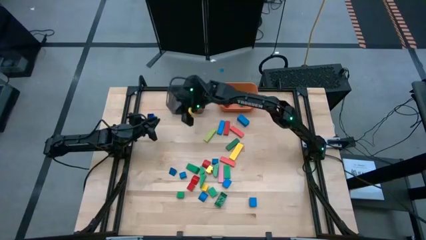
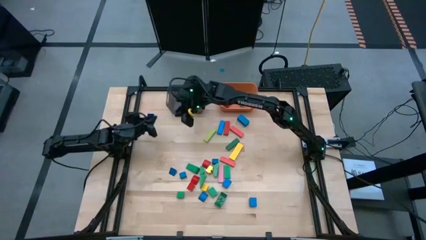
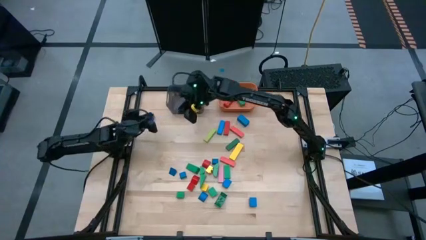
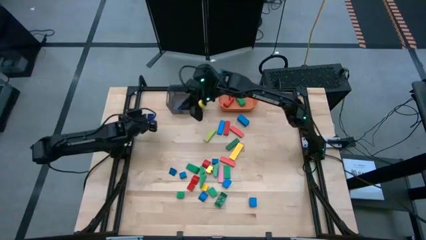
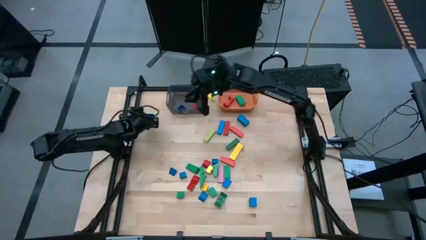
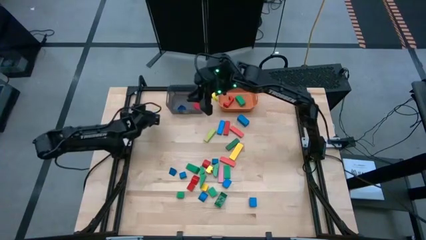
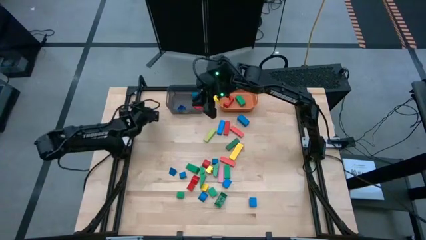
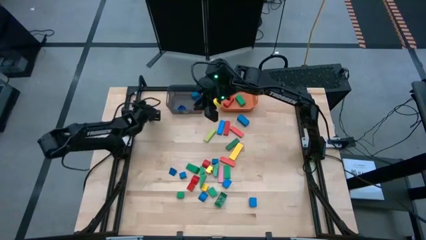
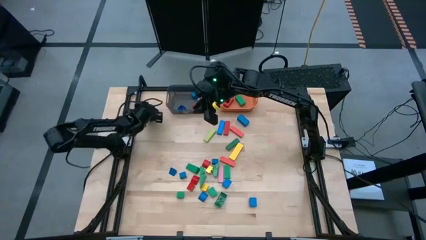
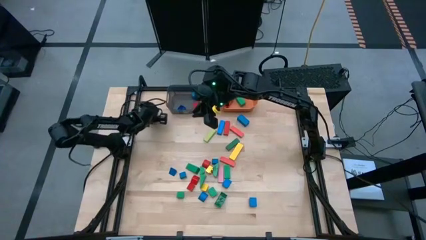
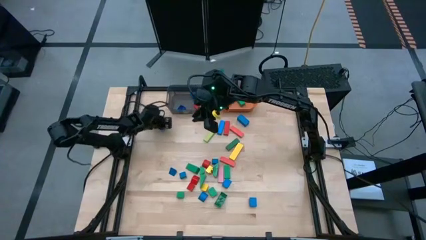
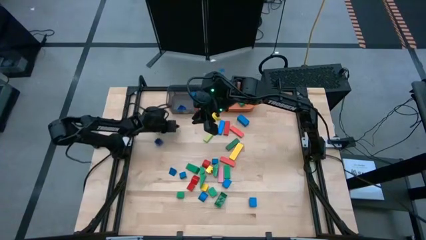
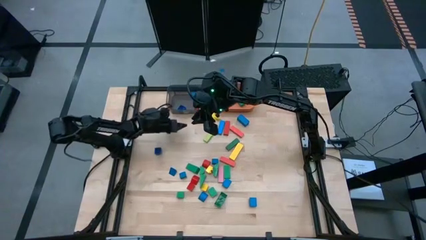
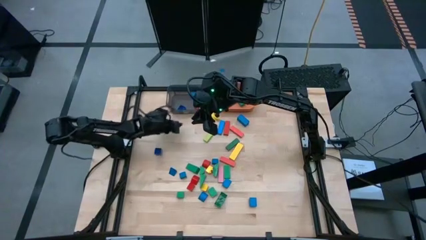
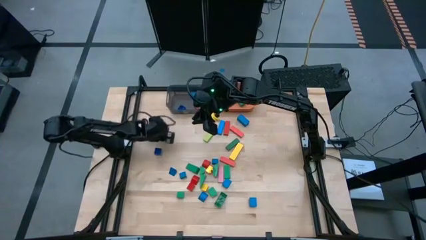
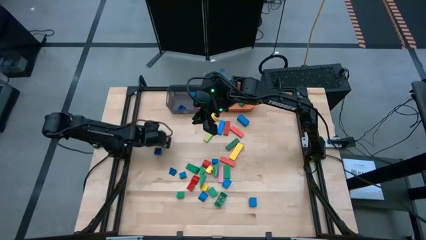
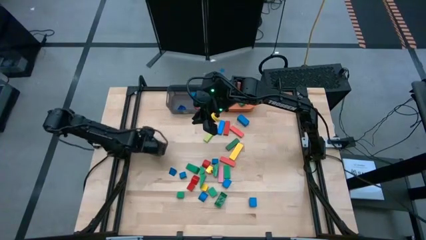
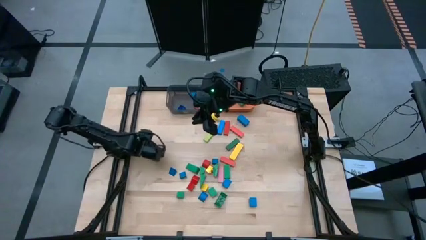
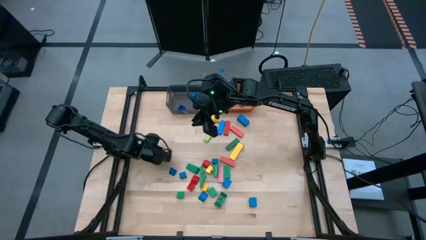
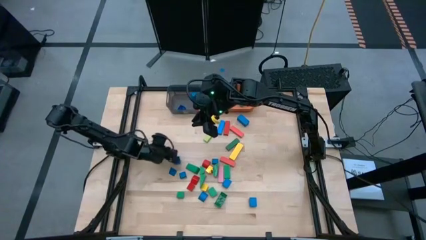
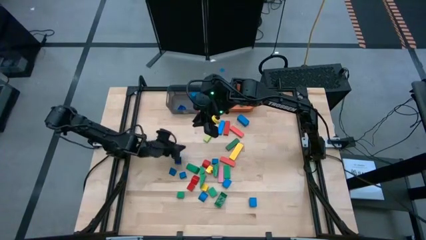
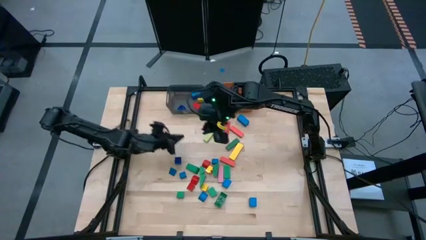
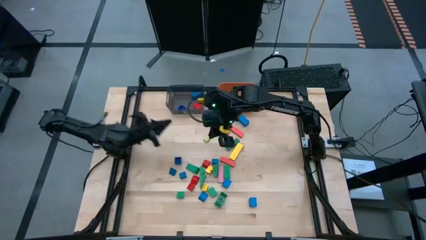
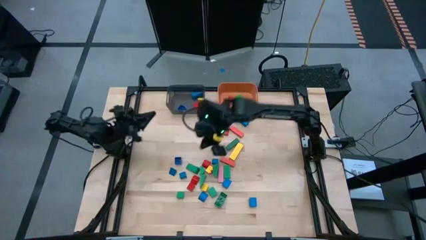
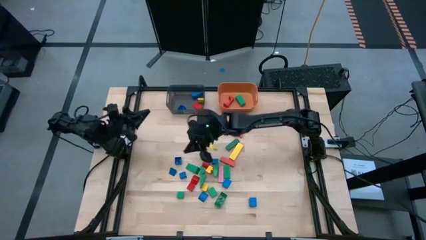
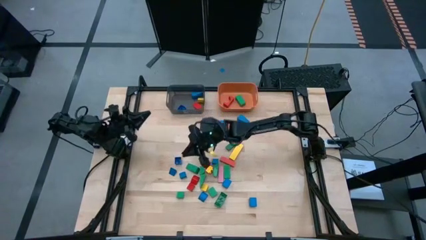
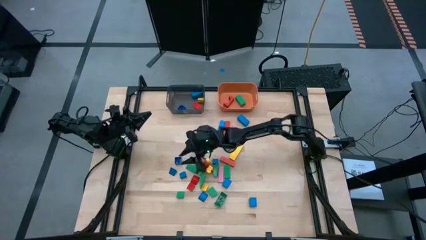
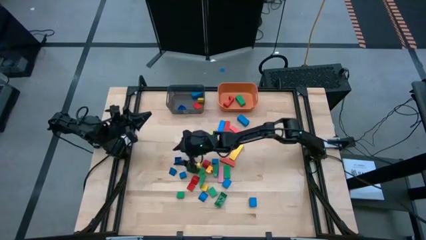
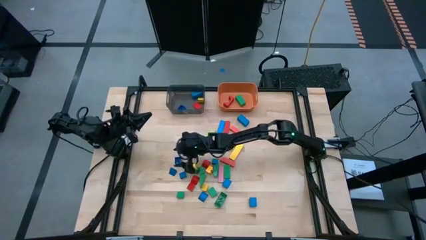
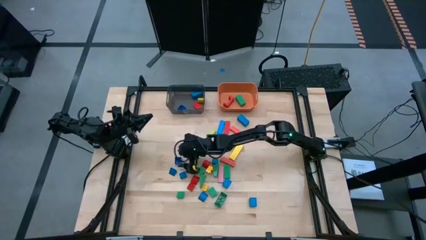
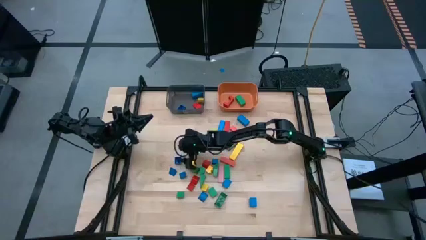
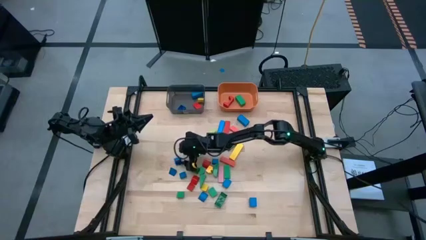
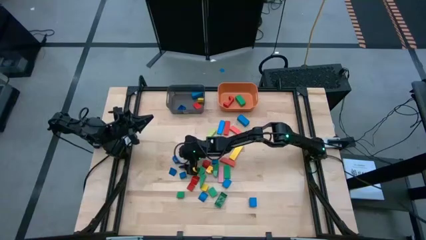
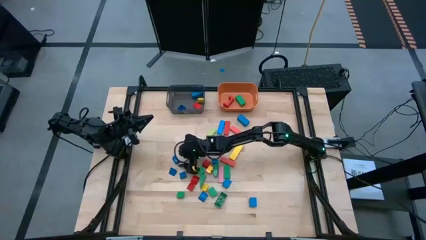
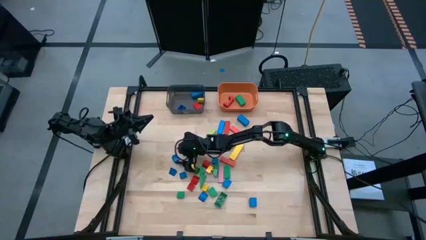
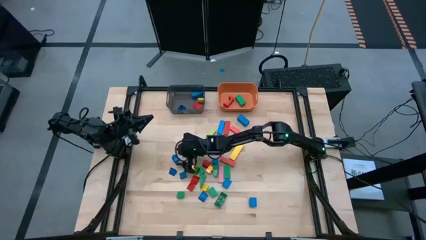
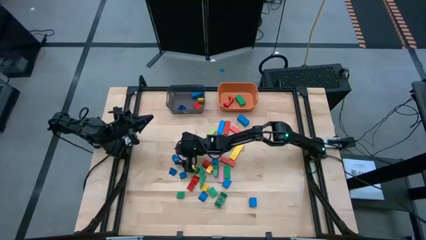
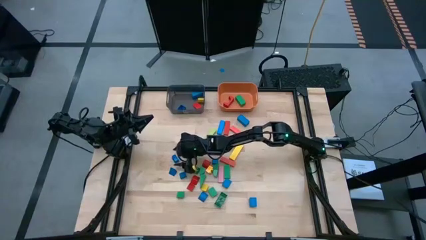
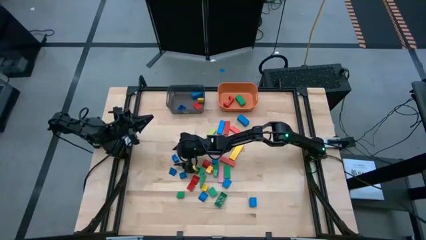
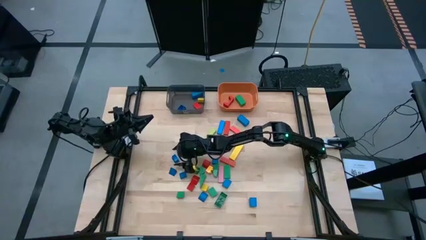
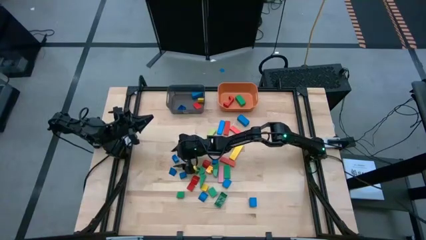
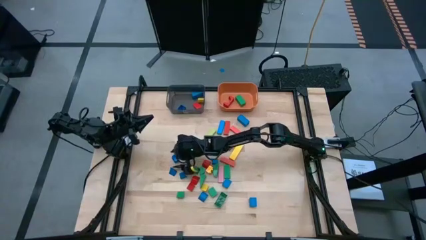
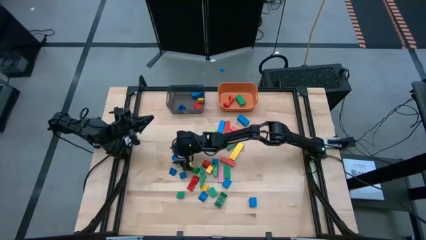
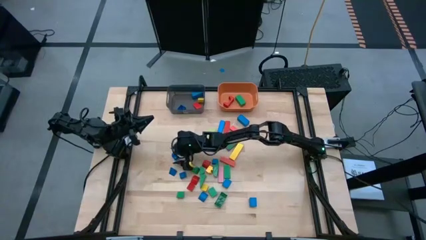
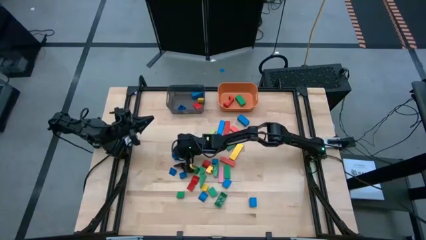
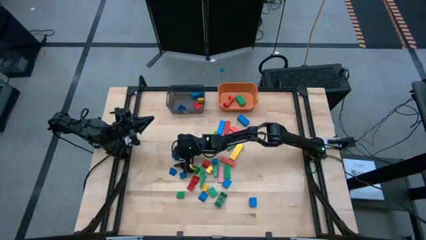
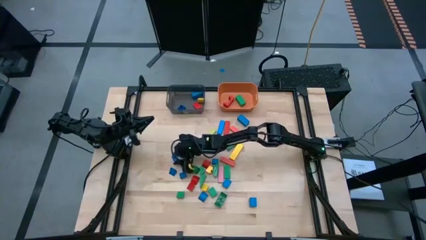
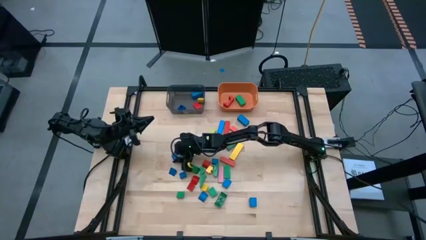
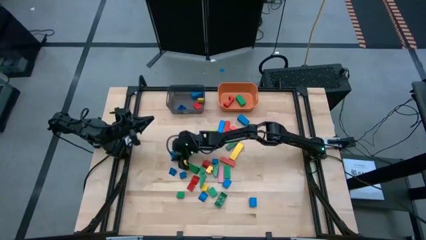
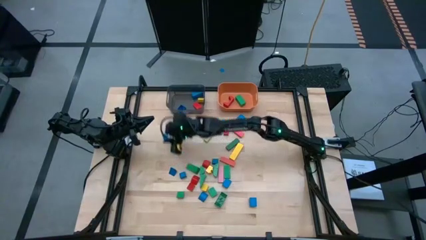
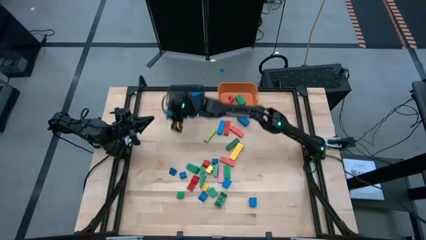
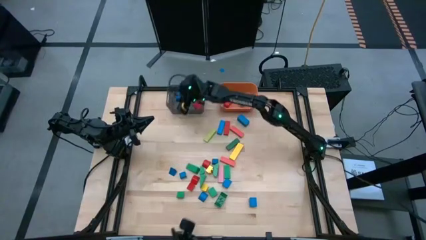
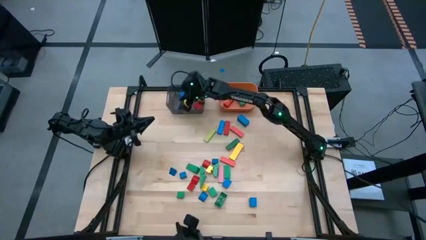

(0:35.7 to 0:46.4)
Task: Sort blocks by size
Put the small blue game piece into the black bin

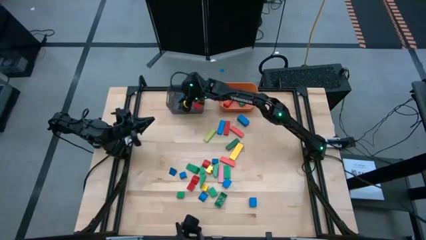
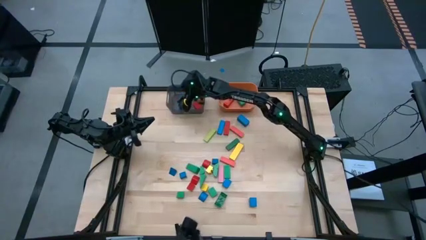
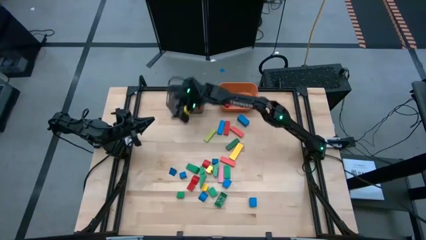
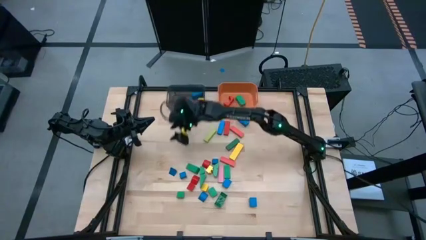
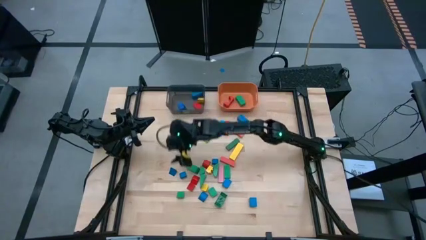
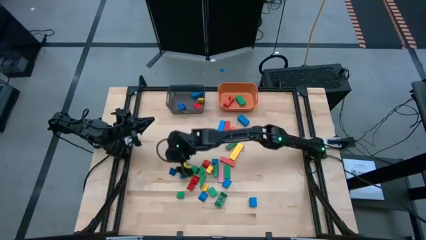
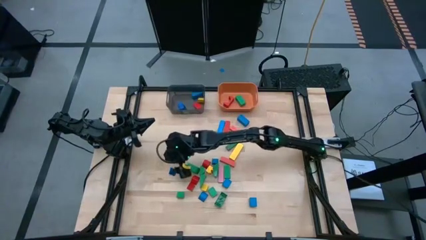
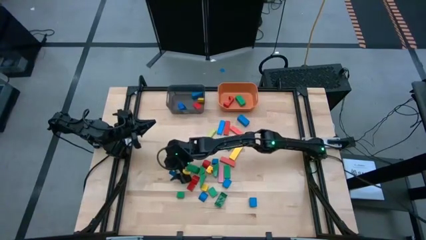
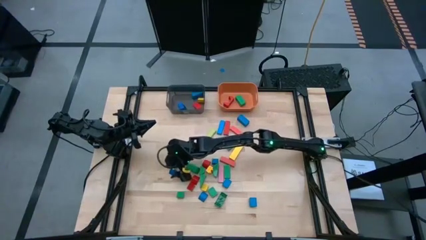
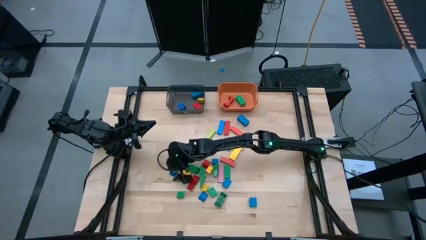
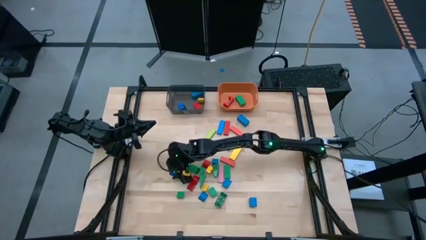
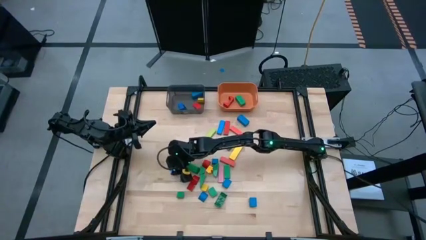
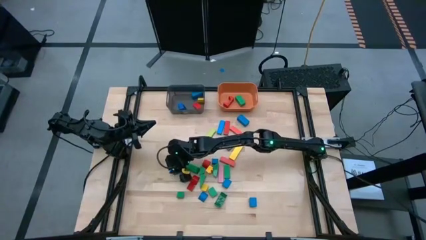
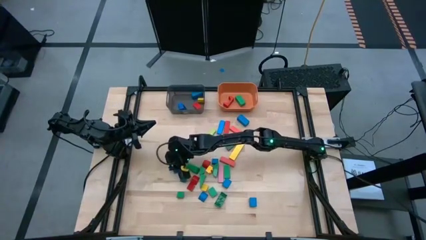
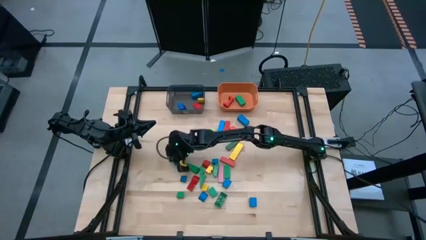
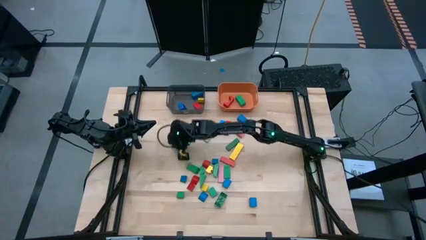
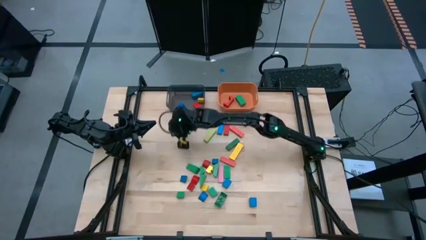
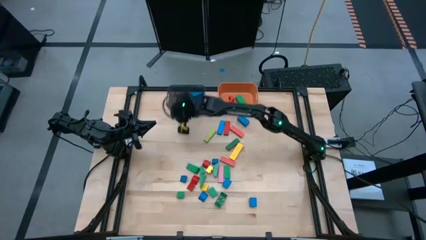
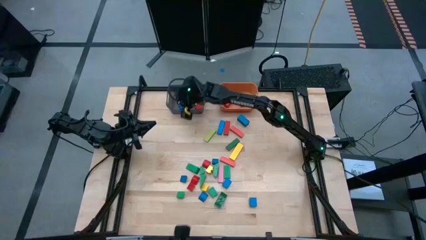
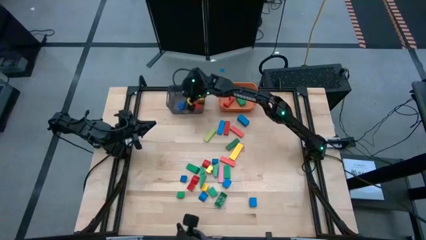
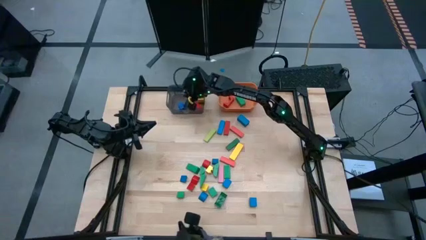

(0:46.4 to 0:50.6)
Put the small blue block into the black bin

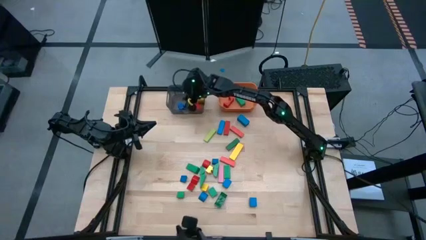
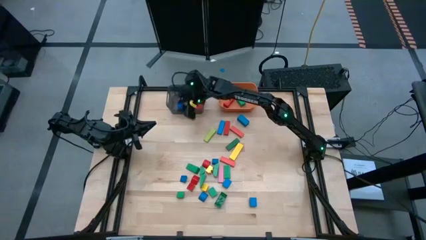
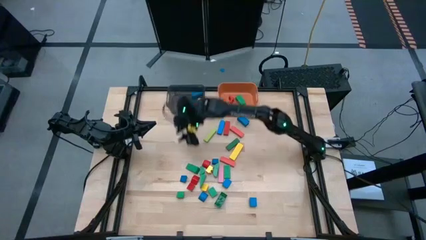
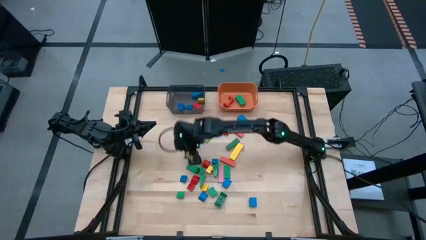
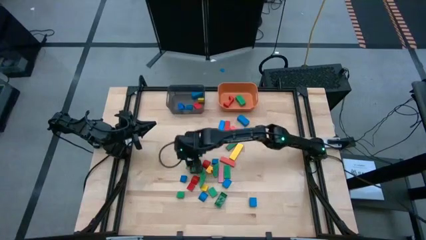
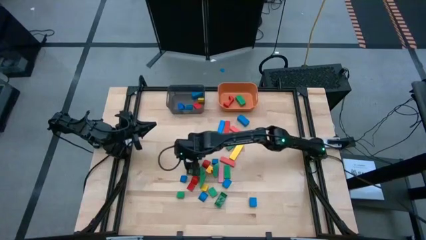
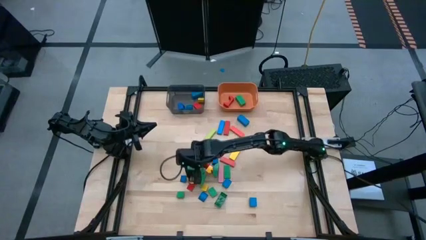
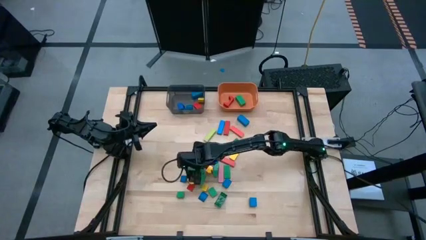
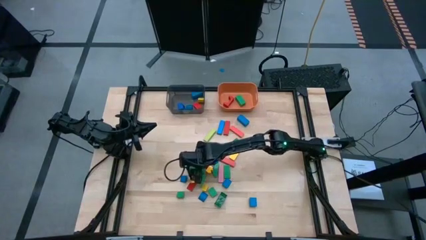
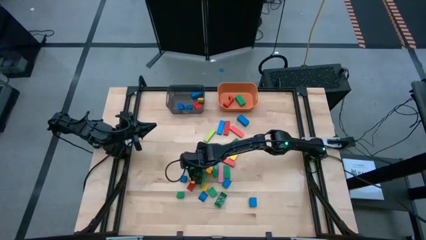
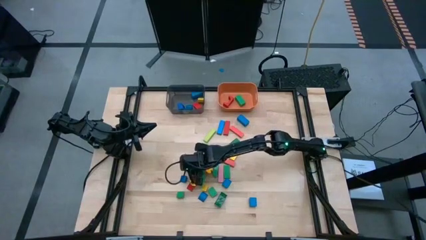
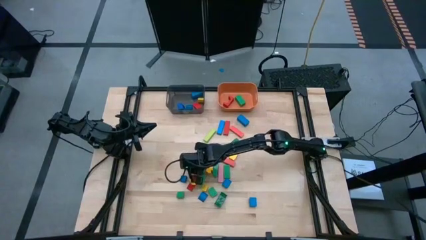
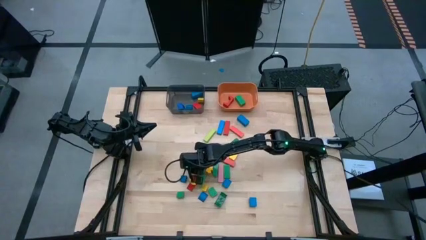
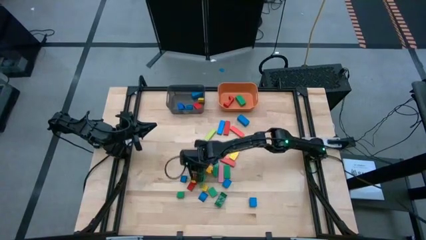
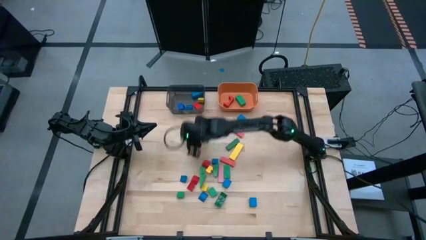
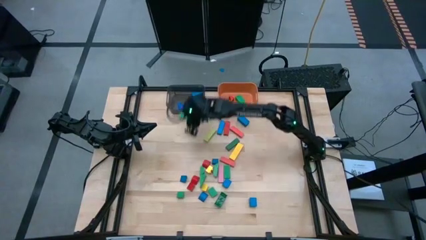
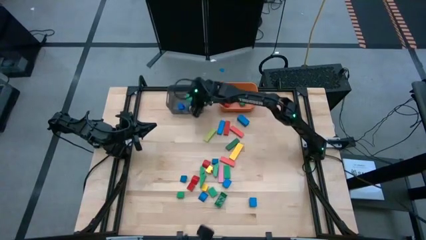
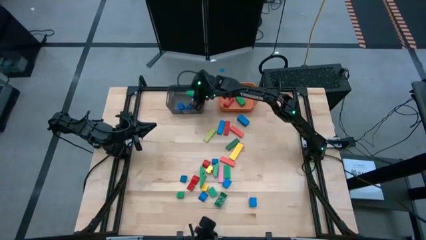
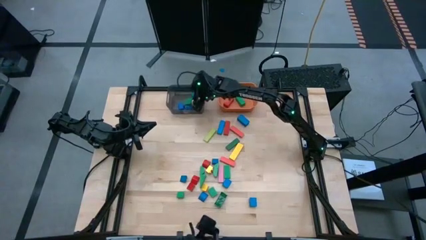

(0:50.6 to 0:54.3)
Put the small green block into the black bin
